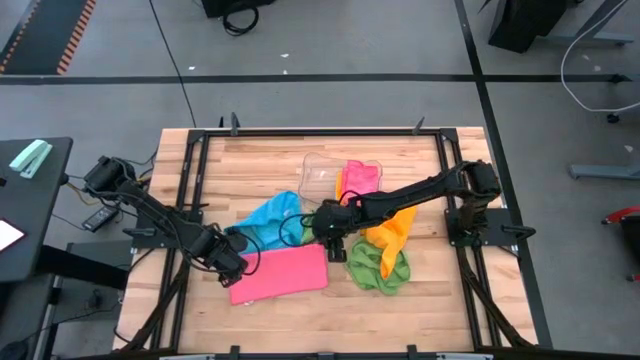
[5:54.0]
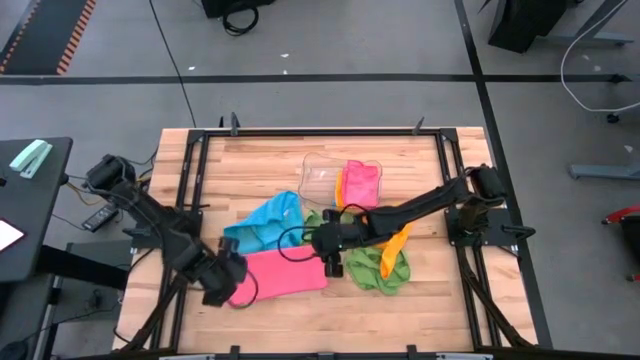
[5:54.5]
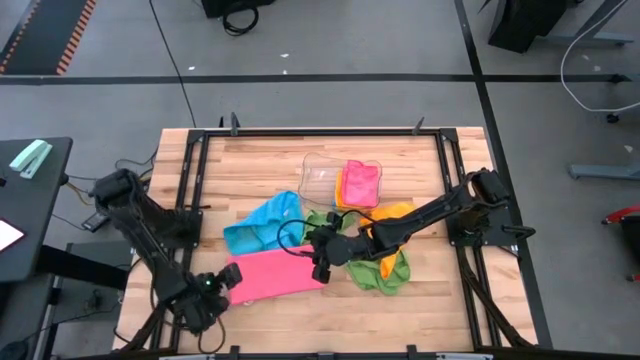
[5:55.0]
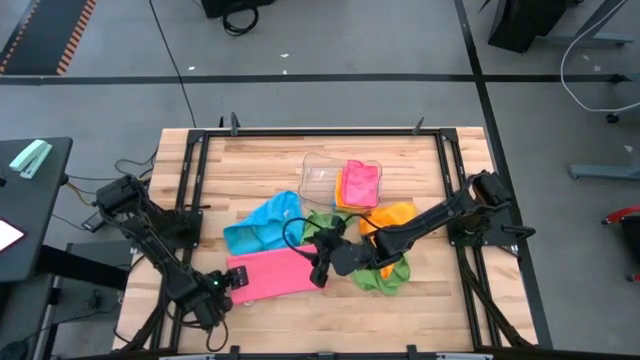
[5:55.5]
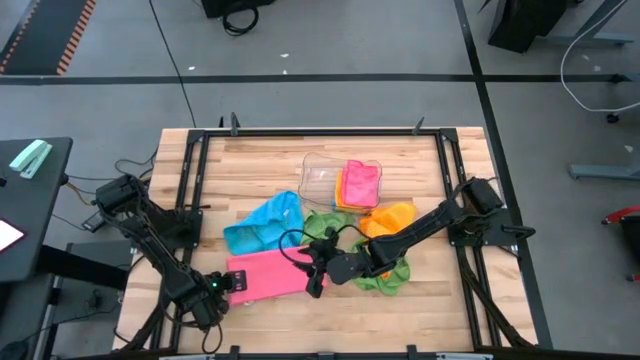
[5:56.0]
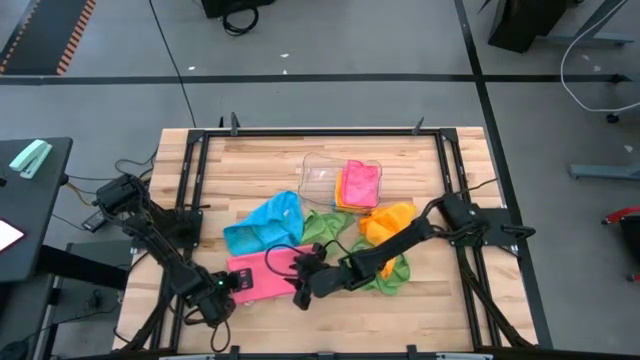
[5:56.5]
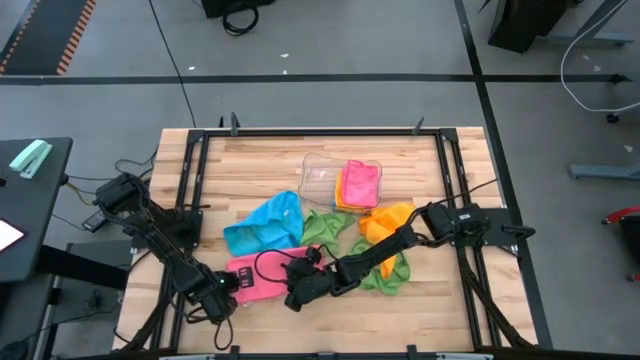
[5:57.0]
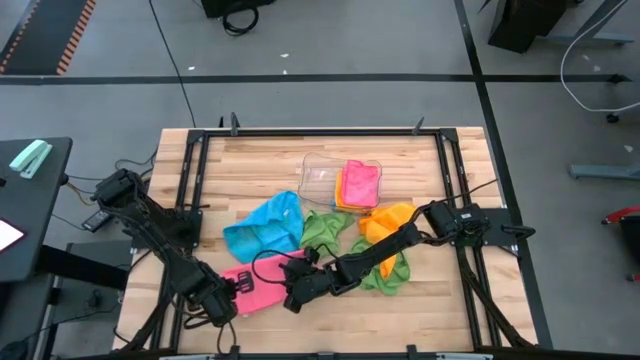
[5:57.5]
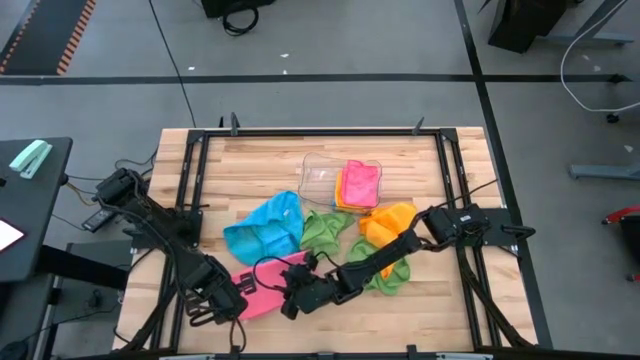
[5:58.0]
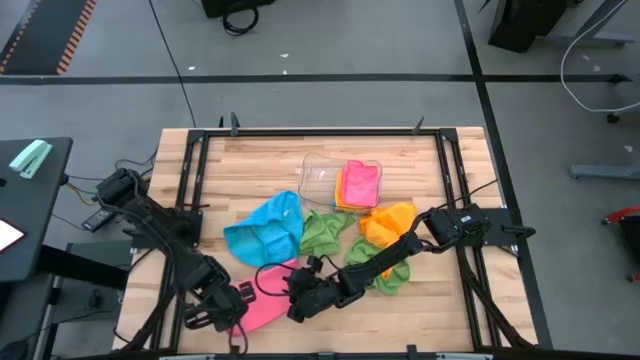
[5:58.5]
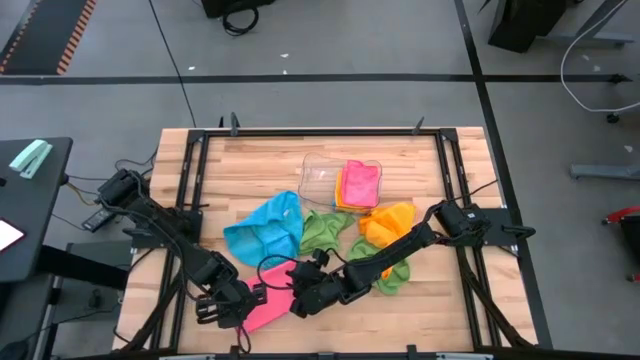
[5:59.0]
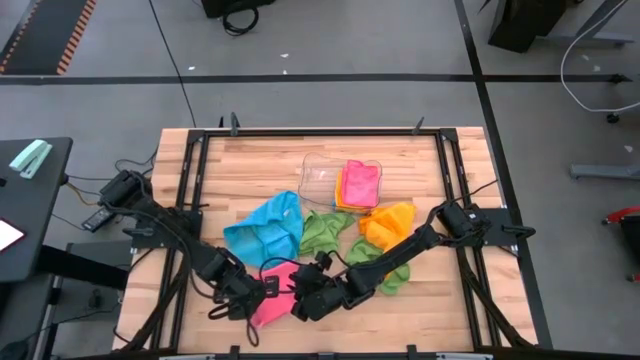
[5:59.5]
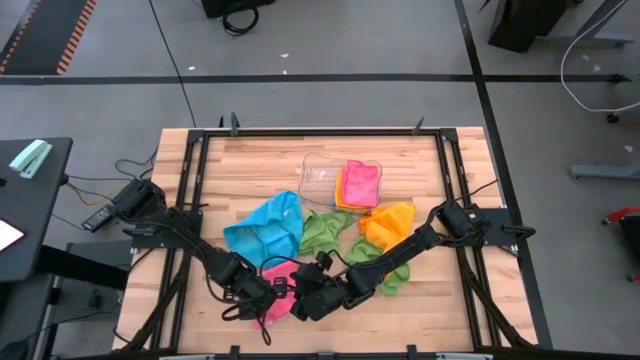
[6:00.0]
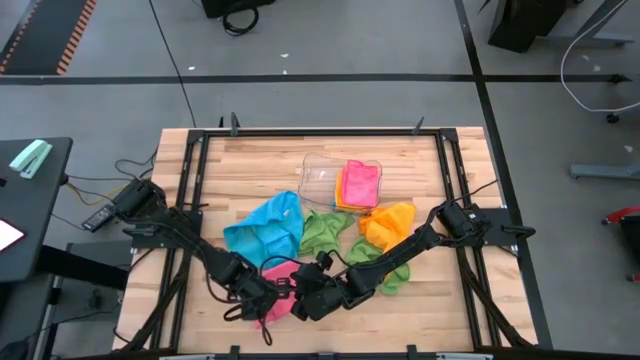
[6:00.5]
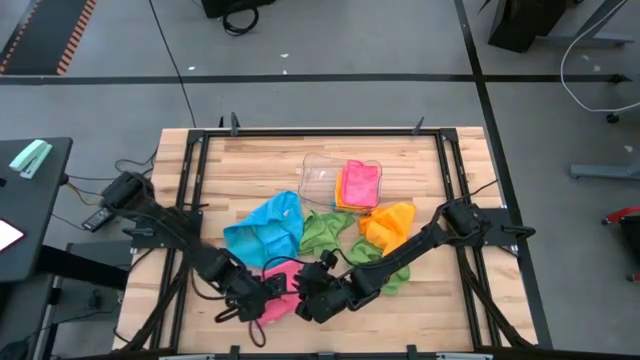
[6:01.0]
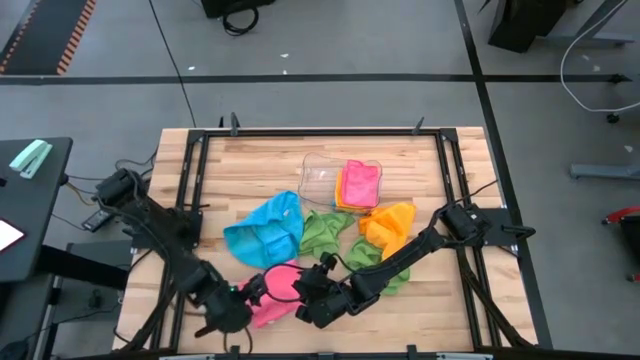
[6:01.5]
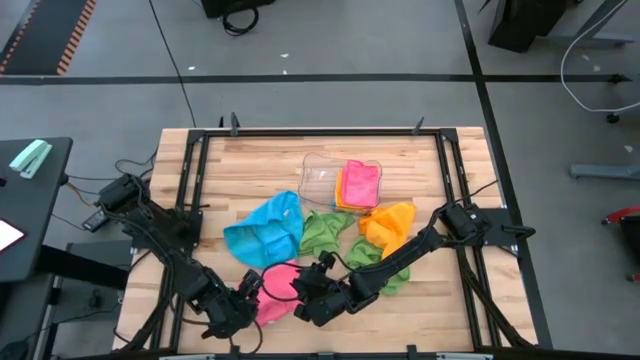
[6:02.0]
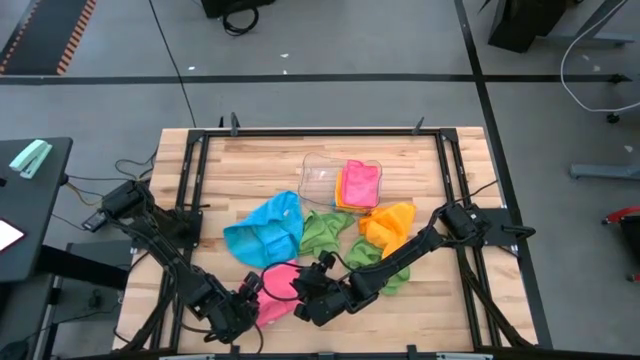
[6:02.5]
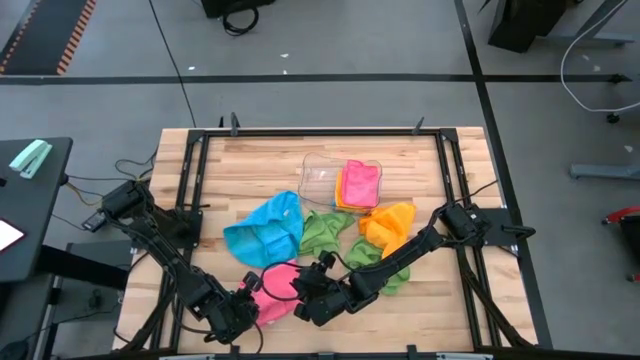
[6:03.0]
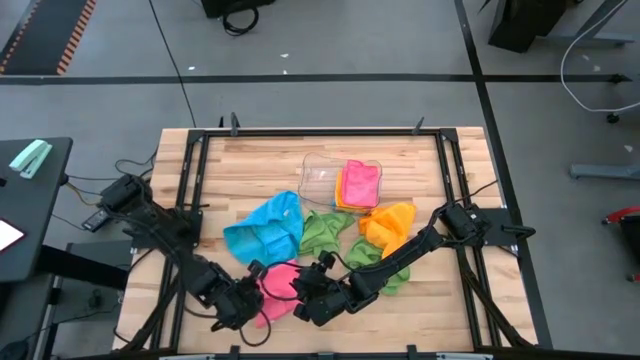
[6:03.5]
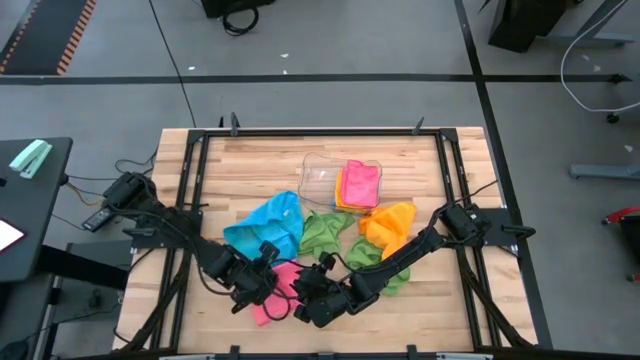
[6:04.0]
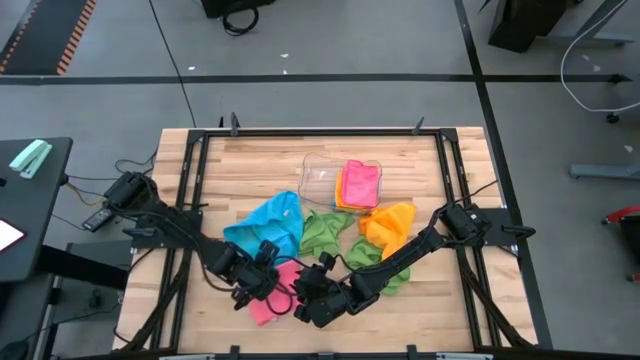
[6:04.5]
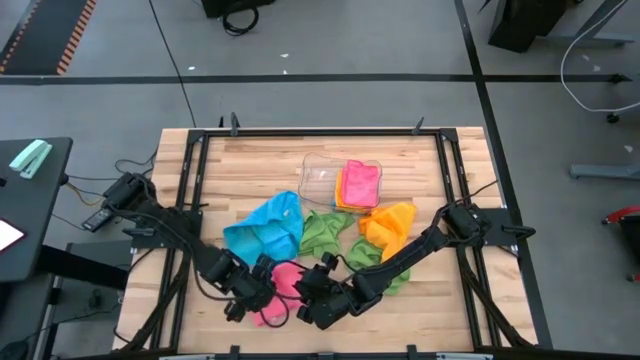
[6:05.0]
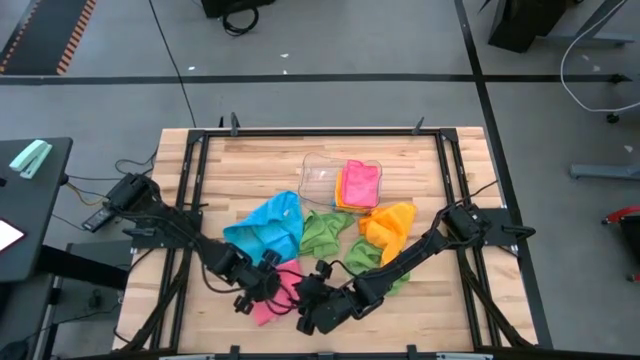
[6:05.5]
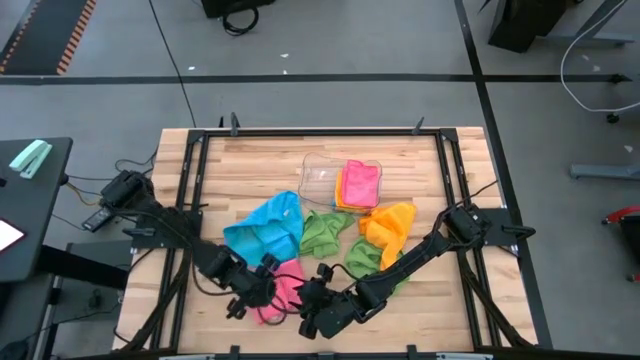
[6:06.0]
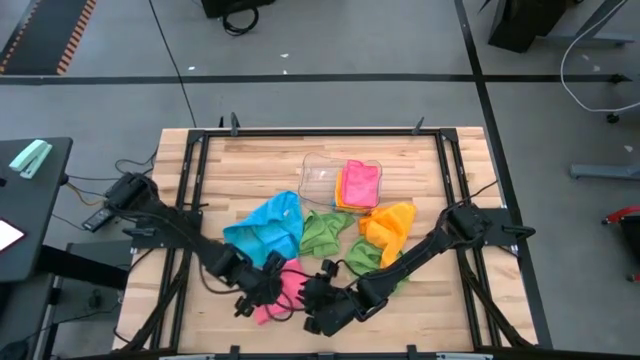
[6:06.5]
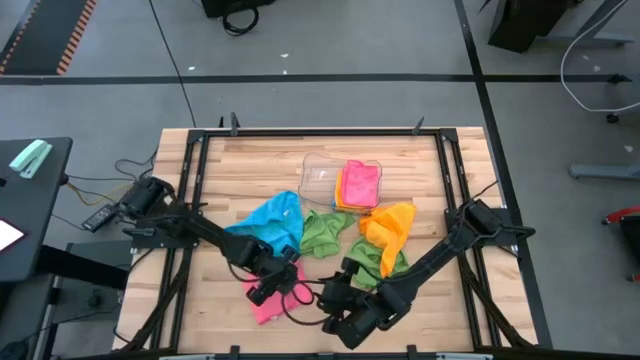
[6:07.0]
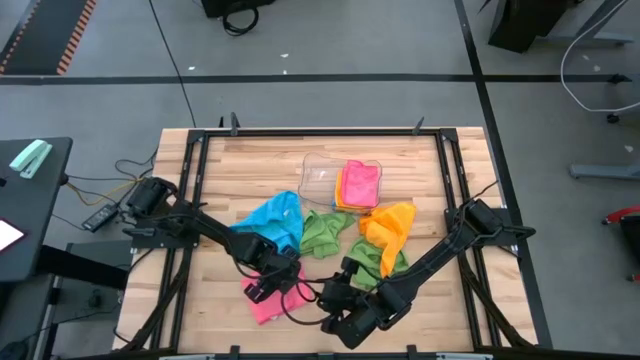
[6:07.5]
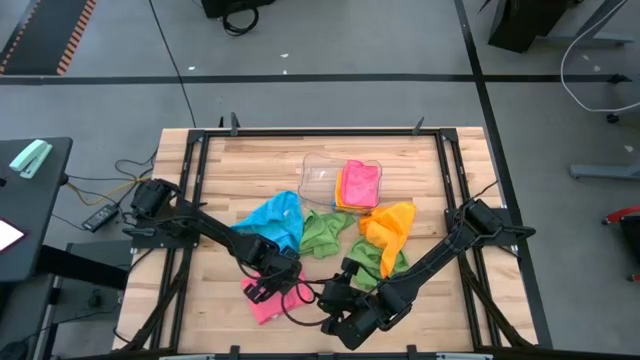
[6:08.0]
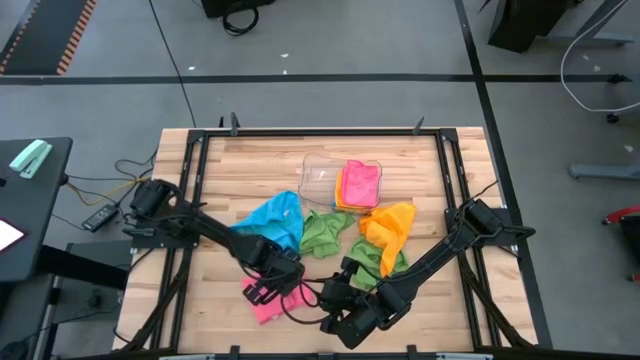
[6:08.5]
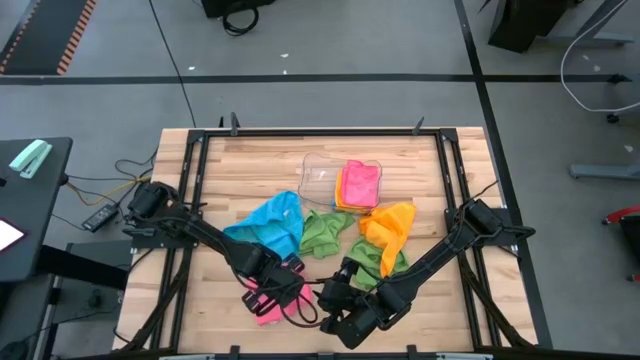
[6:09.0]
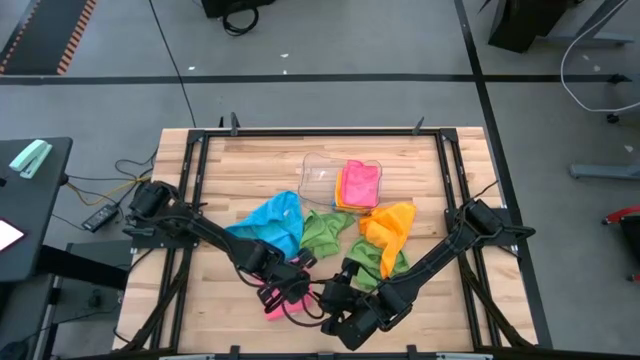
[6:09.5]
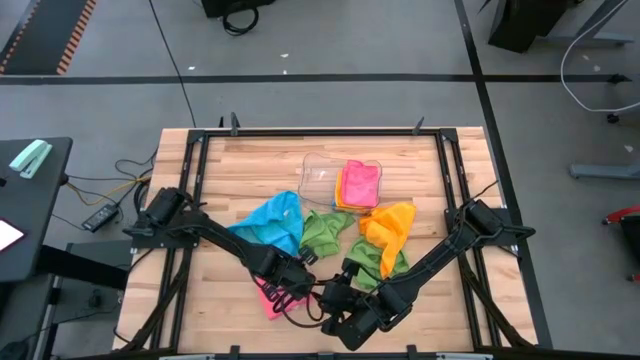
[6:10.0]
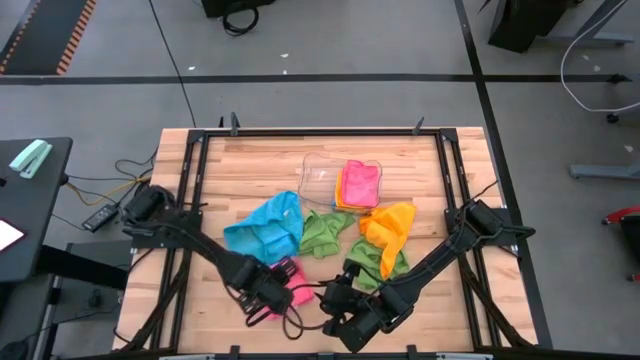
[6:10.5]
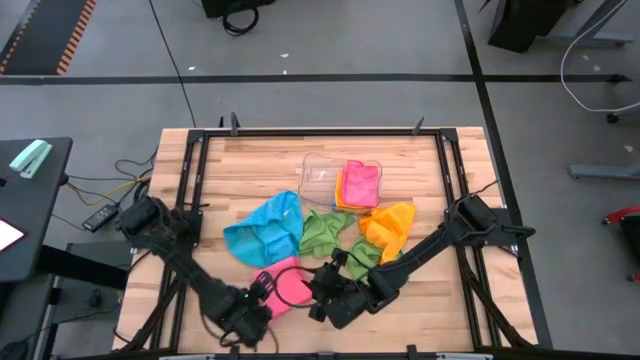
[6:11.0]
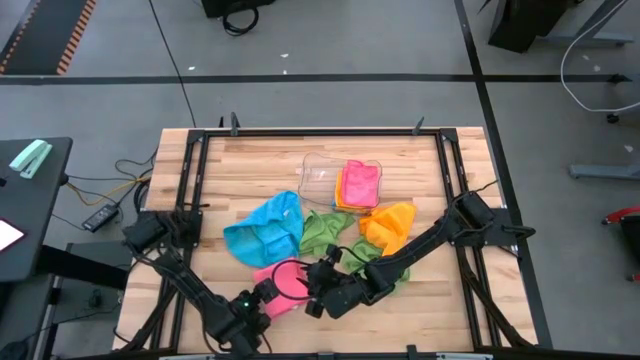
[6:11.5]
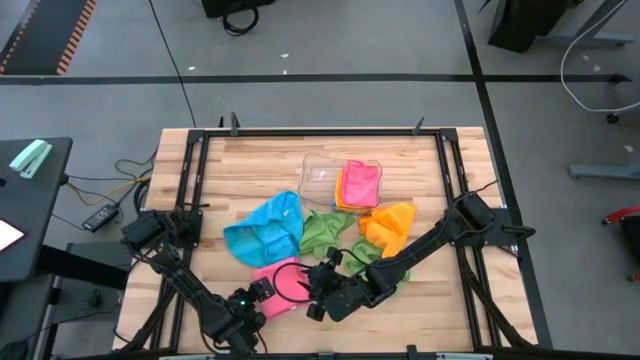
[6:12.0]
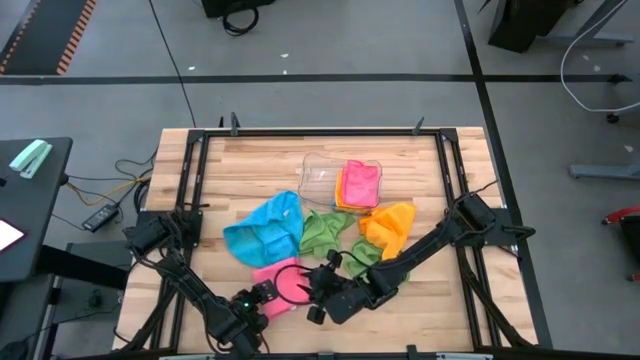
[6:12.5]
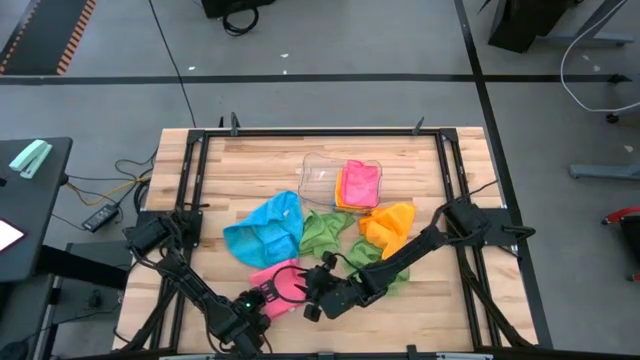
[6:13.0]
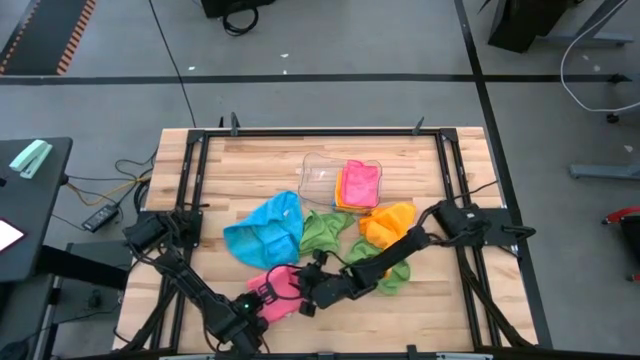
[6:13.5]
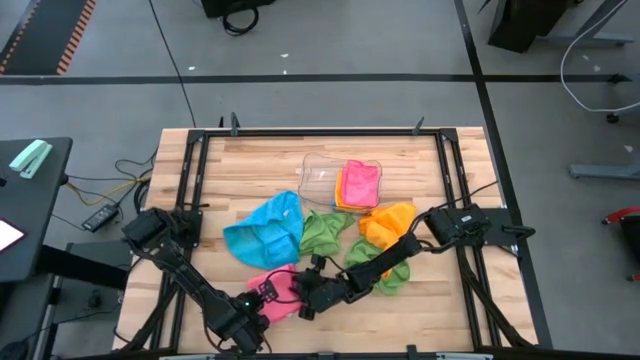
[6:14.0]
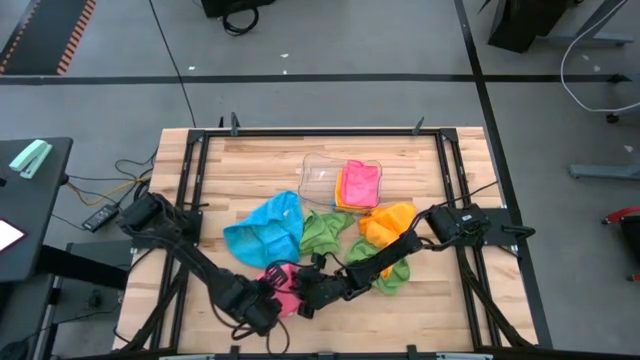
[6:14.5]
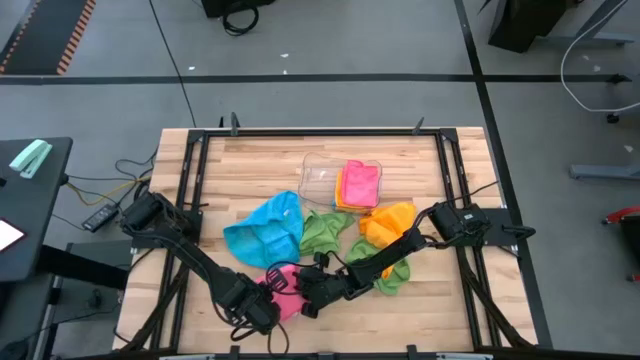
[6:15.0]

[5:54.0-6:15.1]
Task: Fold microfiber towels
Fold the pink microfiber cloth
